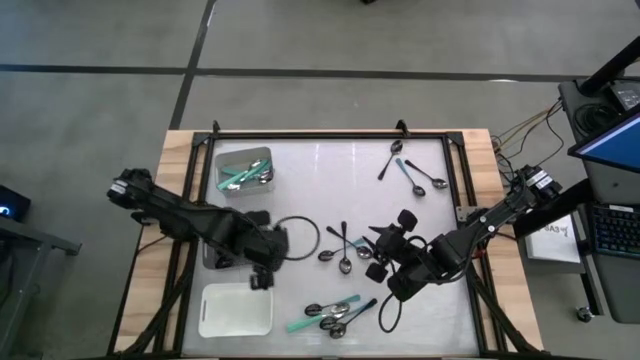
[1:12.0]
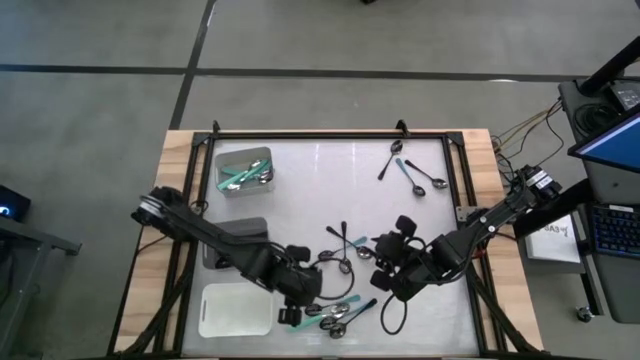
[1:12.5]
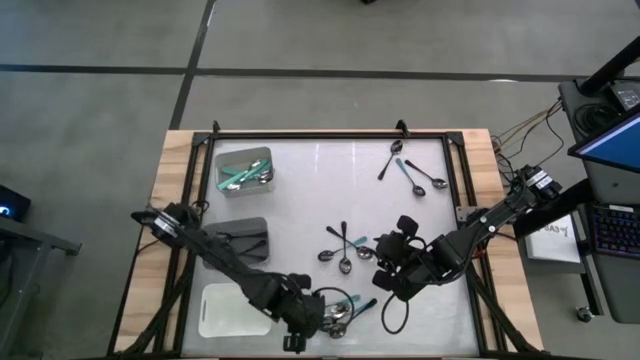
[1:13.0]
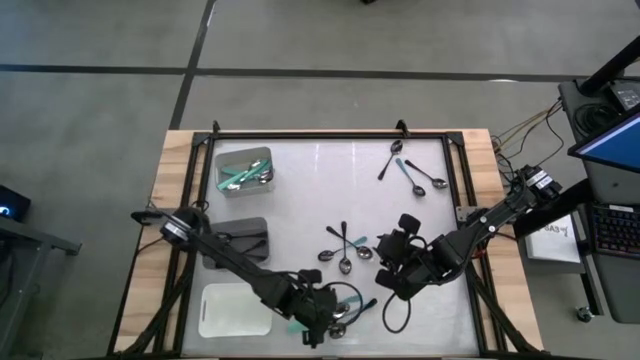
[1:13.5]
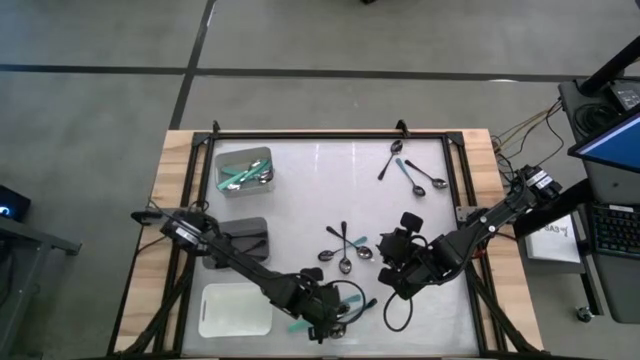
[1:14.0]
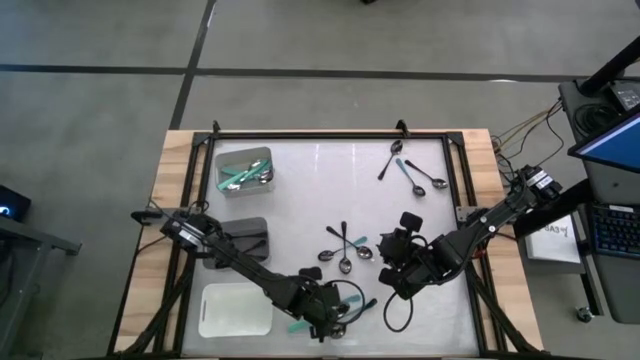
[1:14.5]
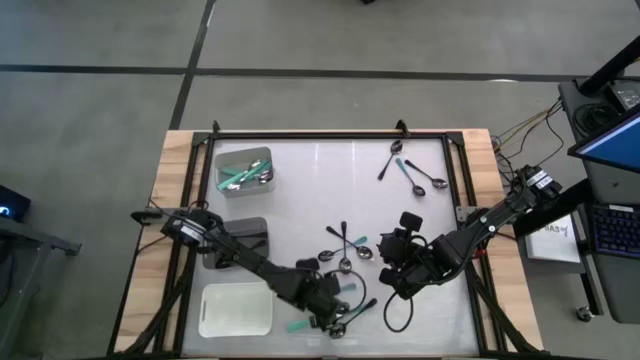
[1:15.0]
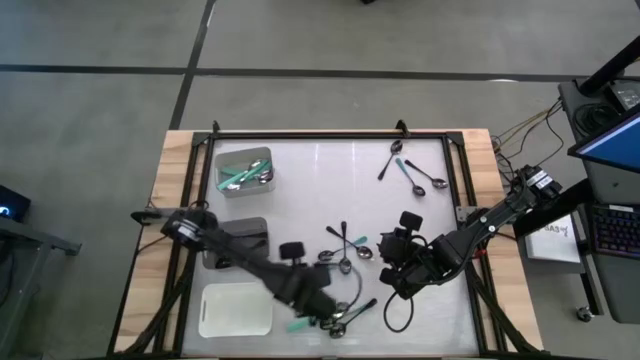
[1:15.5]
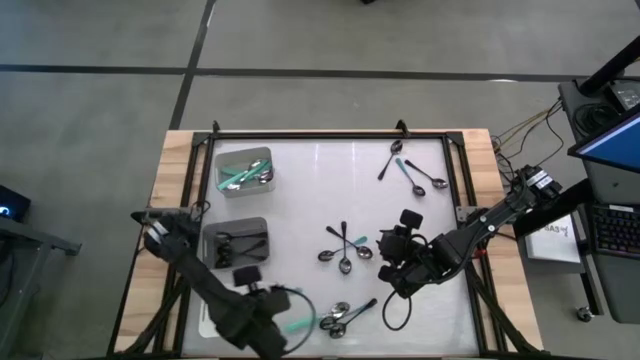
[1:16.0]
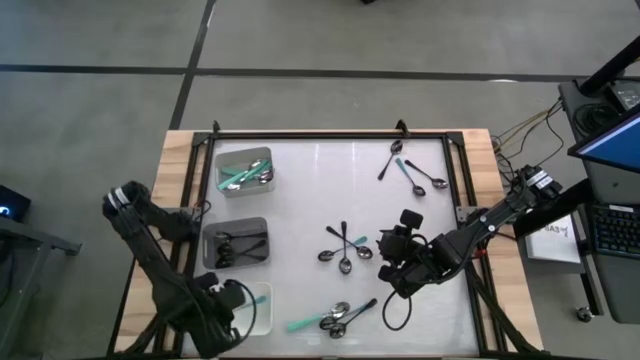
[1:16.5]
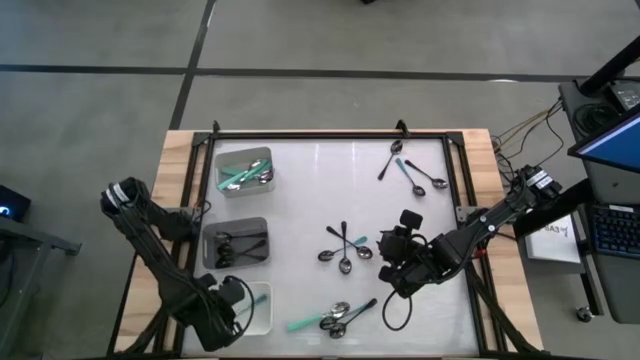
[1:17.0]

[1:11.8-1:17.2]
Task: Sort silverware by color (type)
Put the blue spoon into the white bin

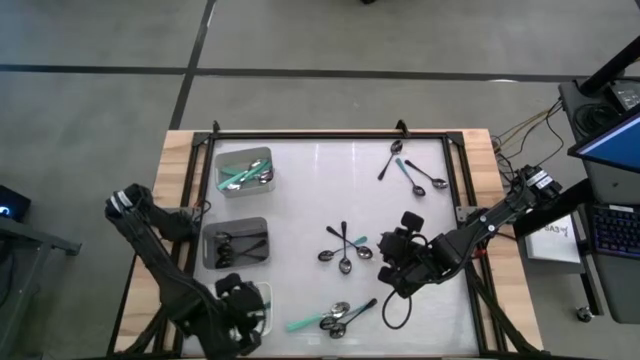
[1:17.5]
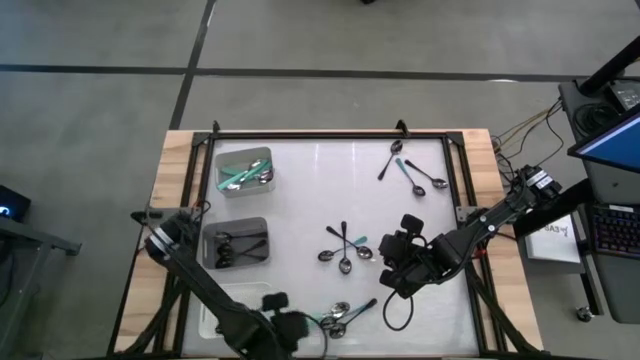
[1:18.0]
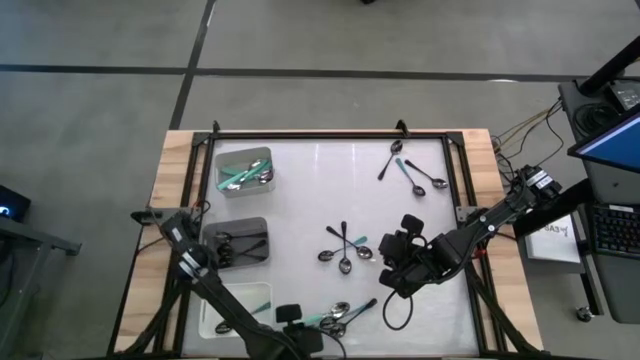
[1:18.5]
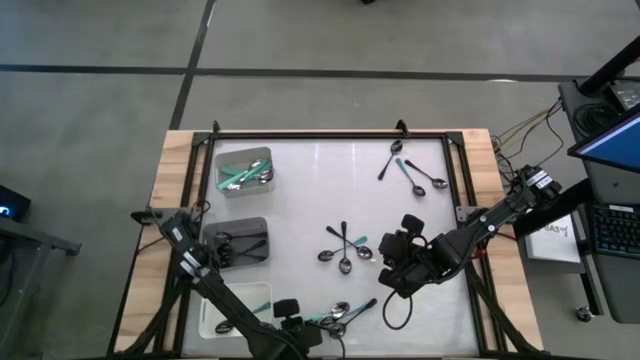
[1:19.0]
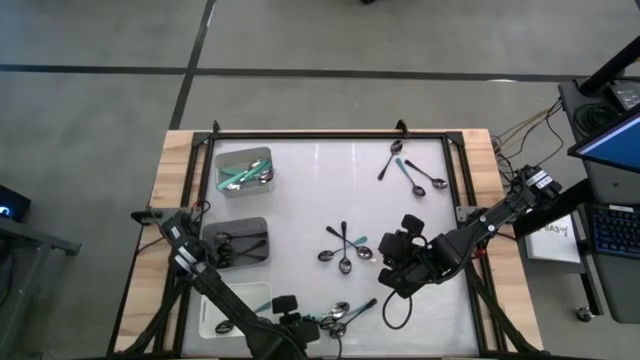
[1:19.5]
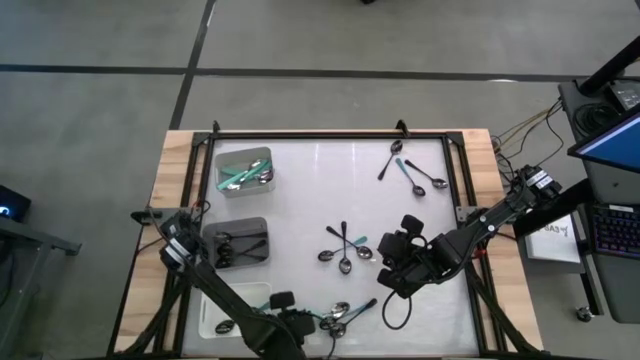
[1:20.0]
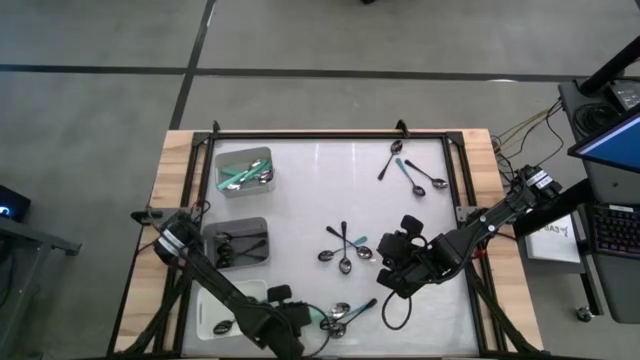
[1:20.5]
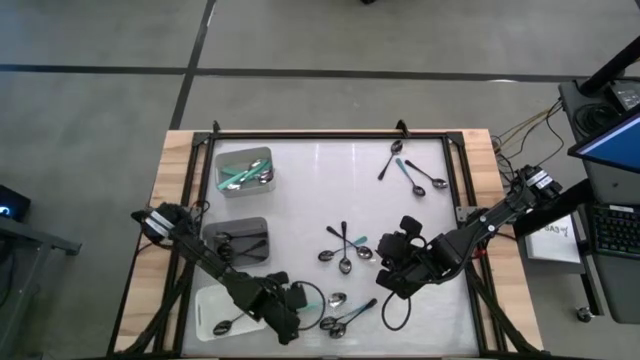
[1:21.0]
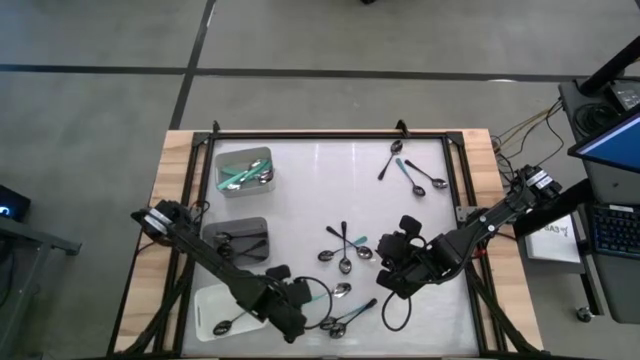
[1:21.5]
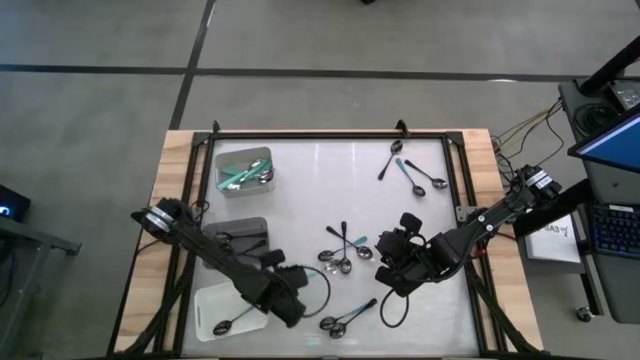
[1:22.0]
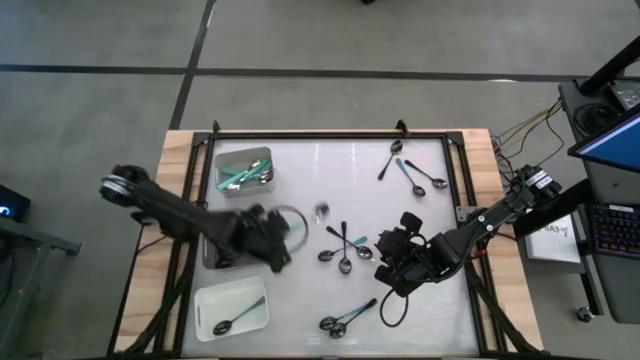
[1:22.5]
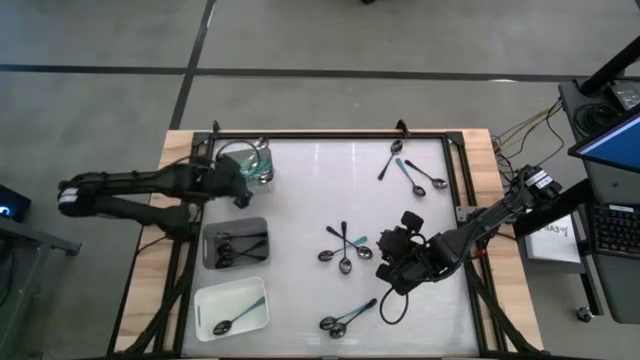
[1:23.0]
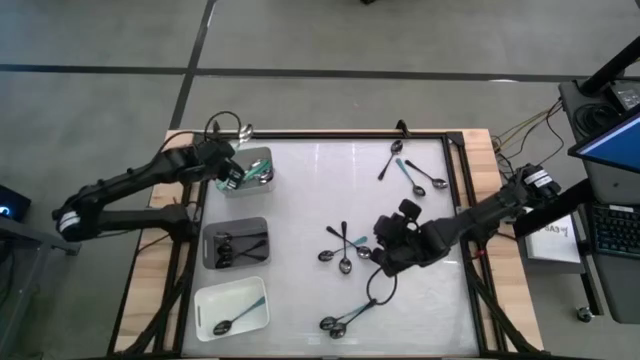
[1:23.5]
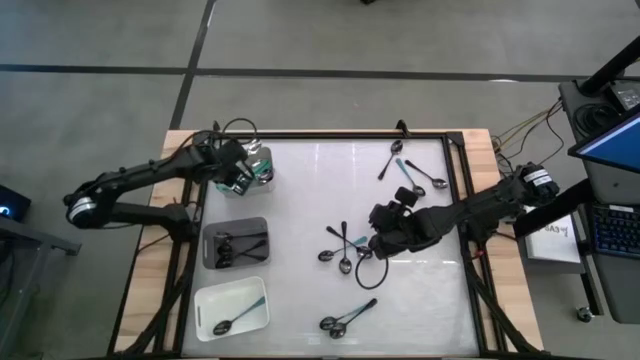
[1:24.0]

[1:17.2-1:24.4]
Put the green spoon into the gray bin

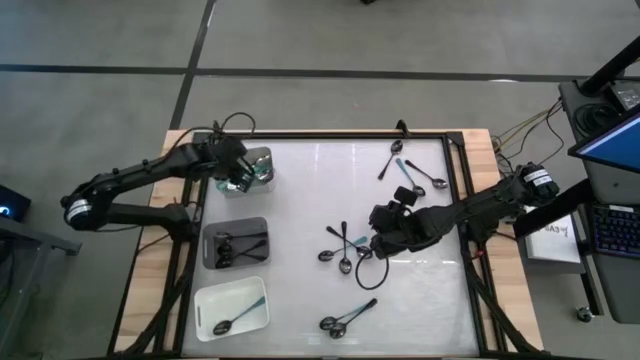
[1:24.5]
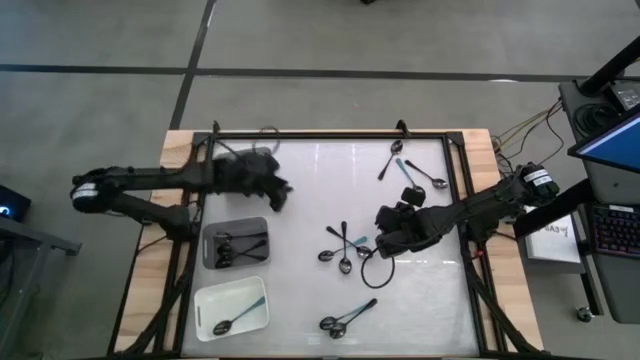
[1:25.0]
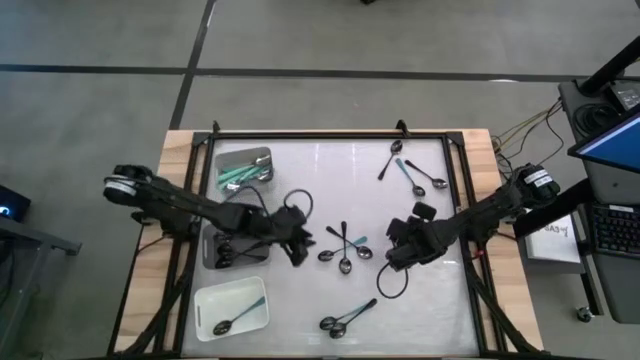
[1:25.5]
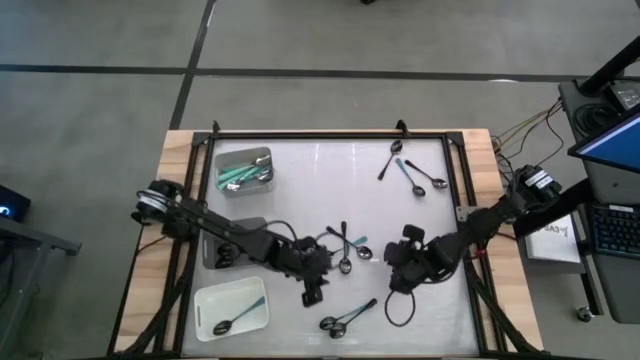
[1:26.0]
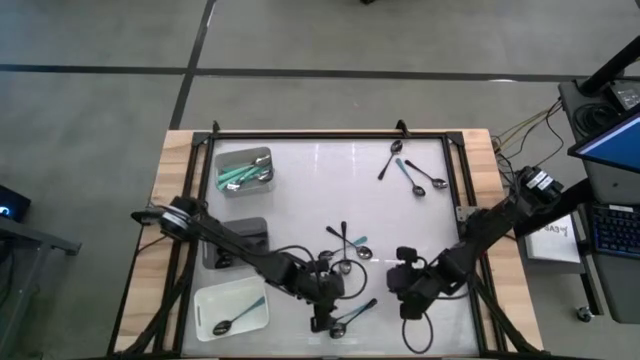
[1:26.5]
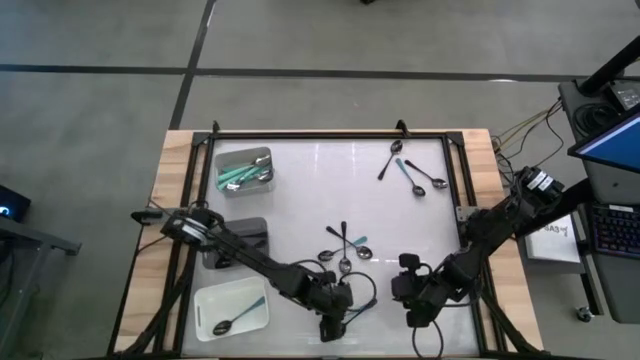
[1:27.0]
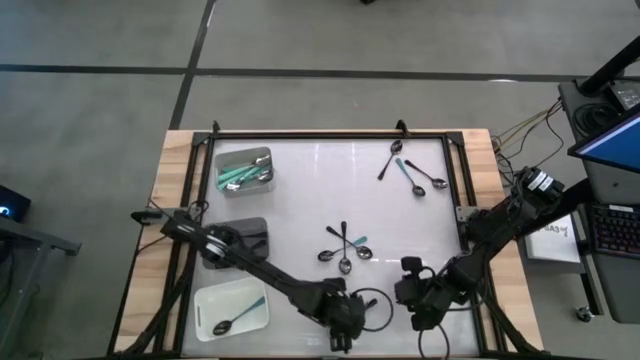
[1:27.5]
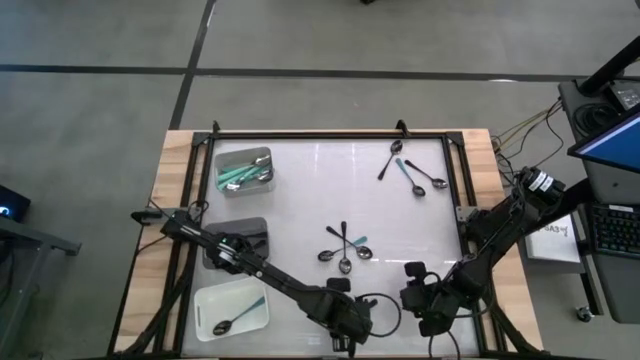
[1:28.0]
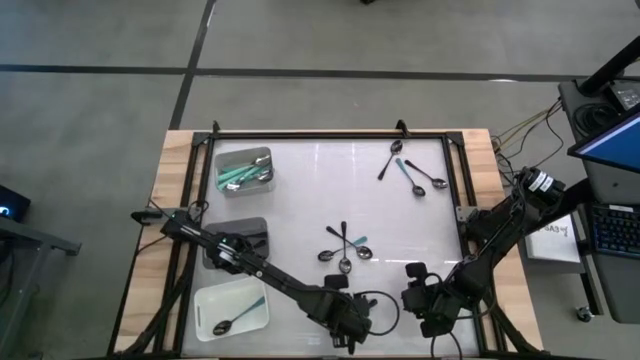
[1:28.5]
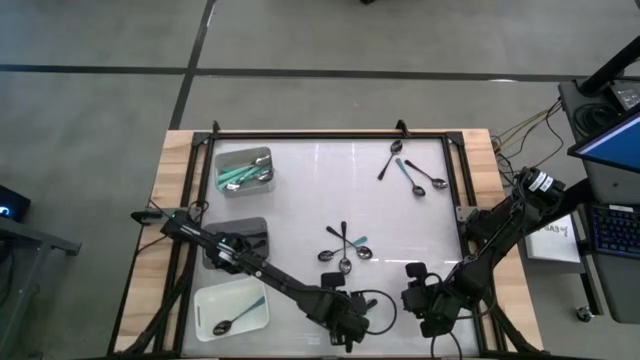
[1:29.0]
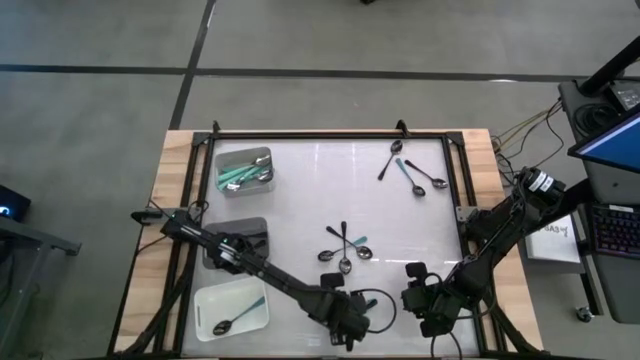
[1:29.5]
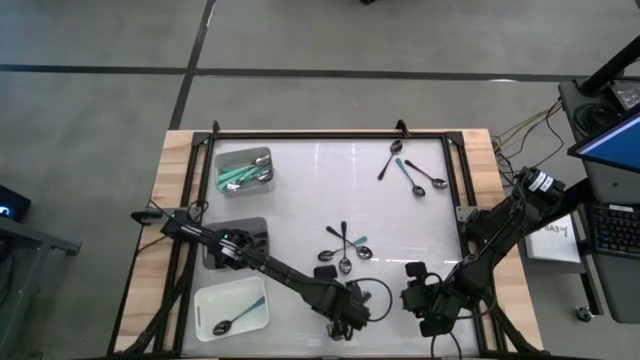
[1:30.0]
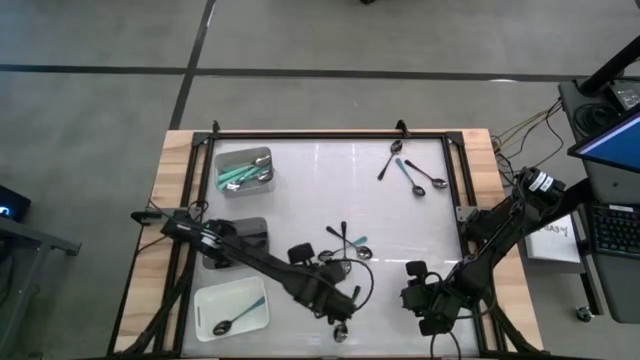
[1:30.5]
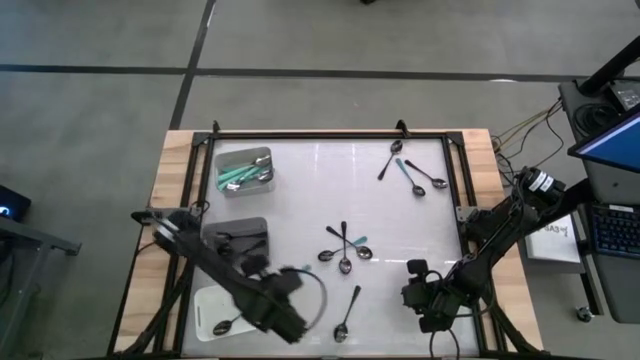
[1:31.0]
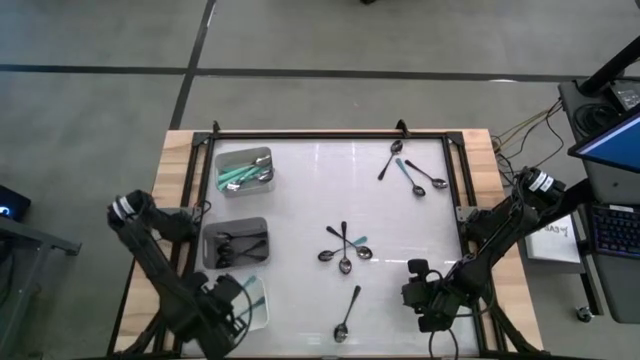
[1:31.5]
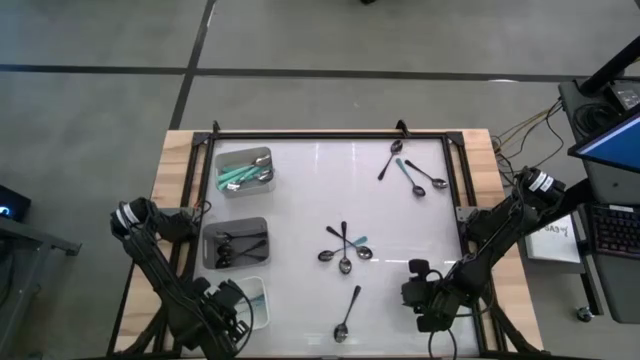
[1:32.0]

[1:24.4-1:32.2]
Put the blue spoon into the white bin
